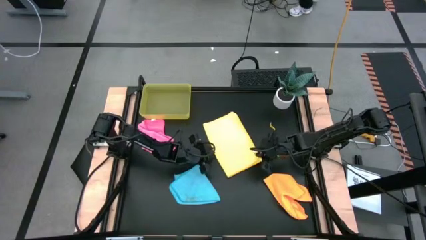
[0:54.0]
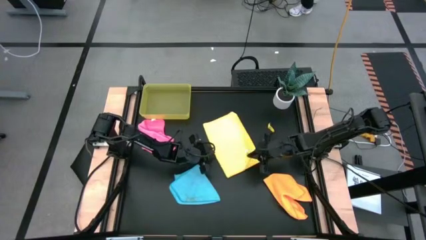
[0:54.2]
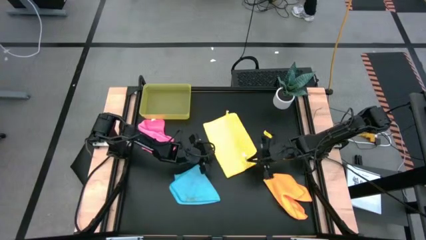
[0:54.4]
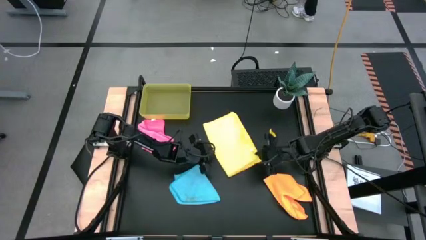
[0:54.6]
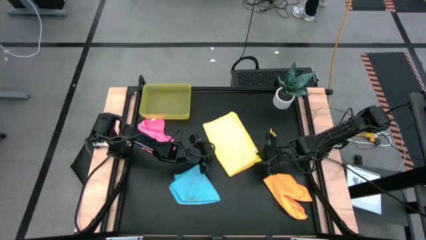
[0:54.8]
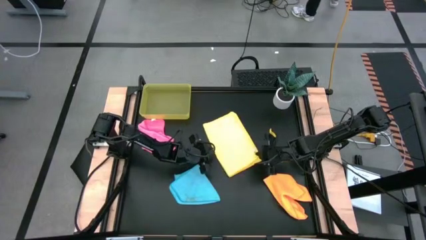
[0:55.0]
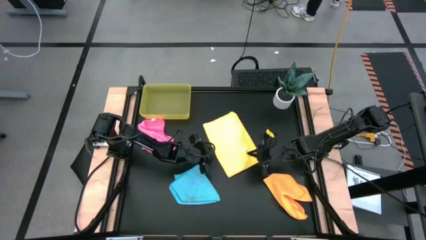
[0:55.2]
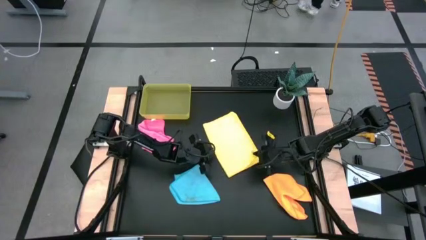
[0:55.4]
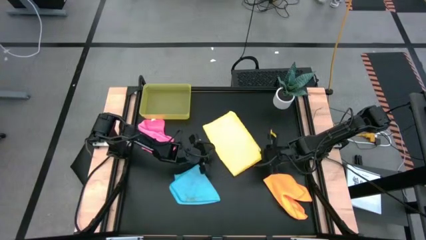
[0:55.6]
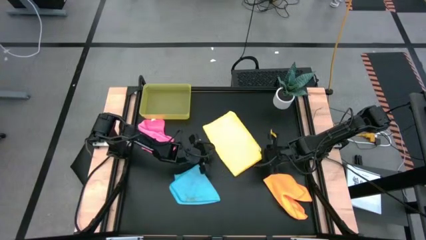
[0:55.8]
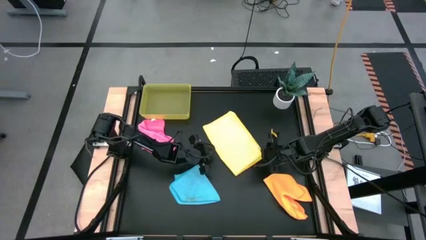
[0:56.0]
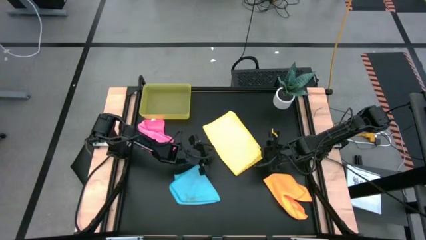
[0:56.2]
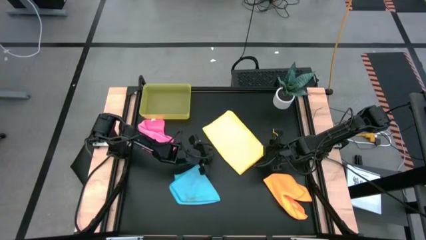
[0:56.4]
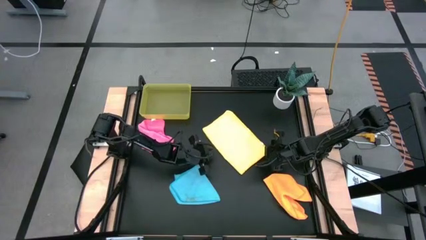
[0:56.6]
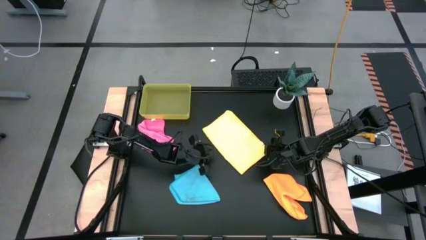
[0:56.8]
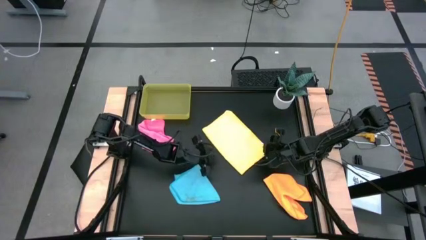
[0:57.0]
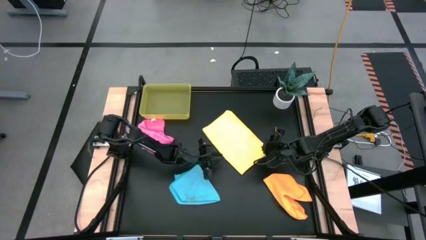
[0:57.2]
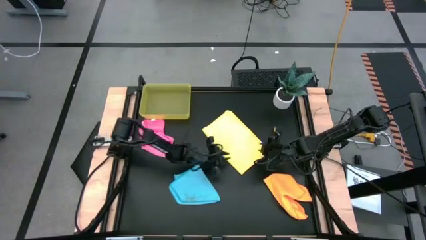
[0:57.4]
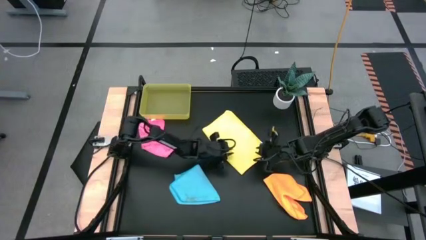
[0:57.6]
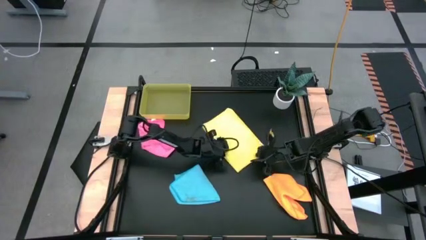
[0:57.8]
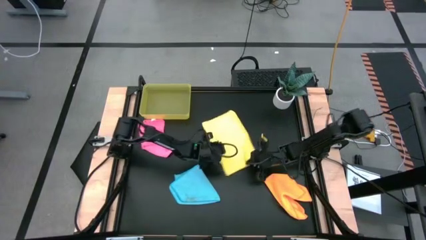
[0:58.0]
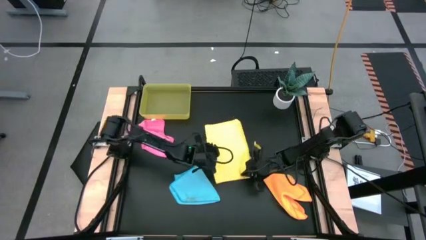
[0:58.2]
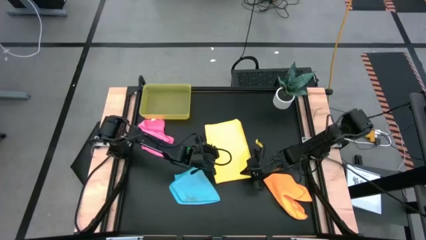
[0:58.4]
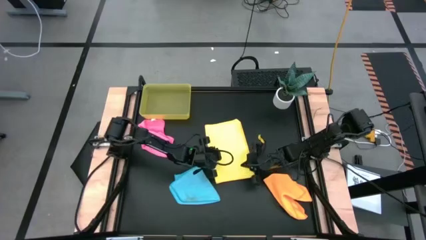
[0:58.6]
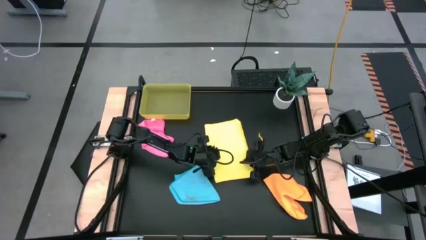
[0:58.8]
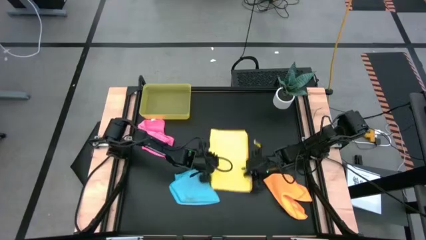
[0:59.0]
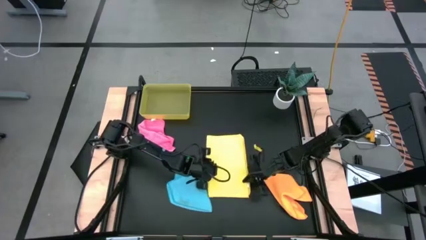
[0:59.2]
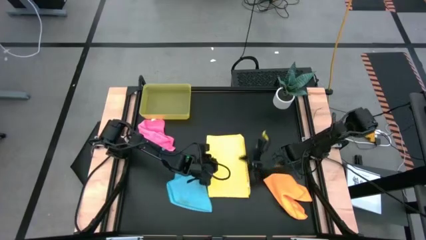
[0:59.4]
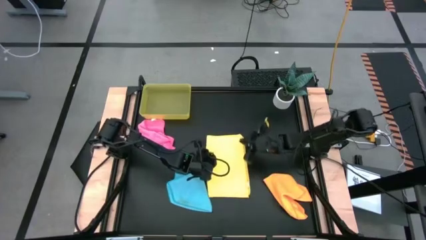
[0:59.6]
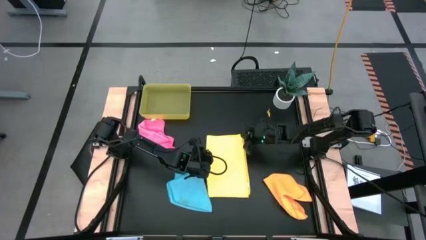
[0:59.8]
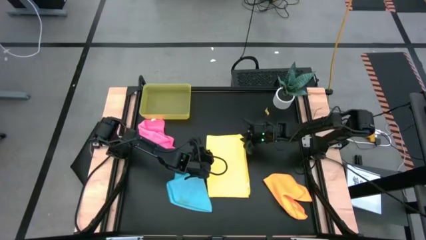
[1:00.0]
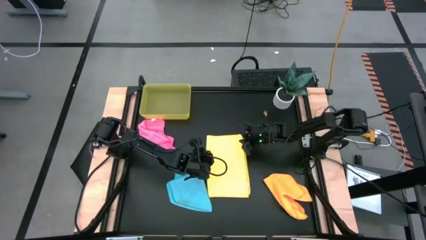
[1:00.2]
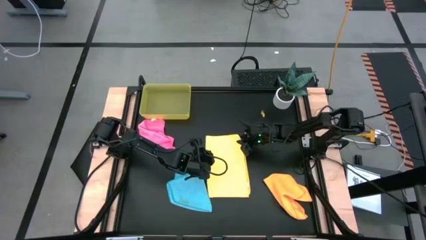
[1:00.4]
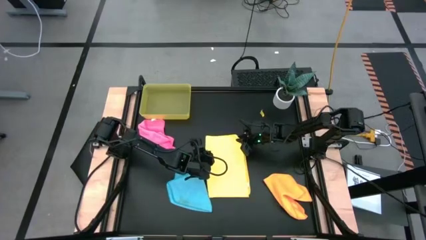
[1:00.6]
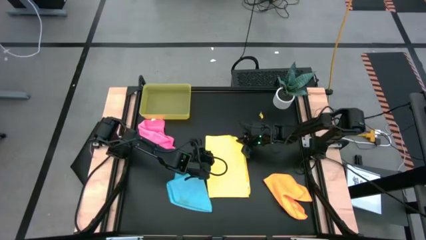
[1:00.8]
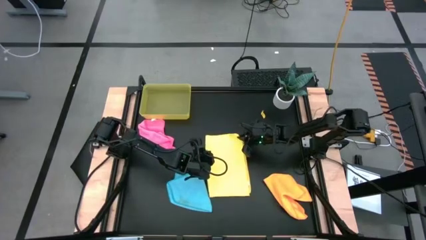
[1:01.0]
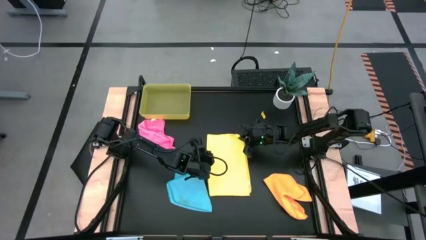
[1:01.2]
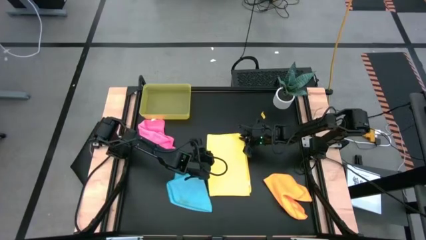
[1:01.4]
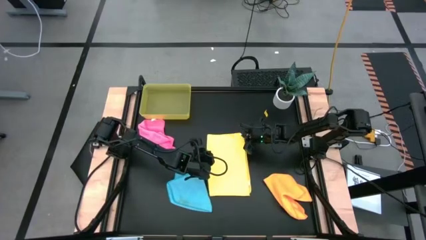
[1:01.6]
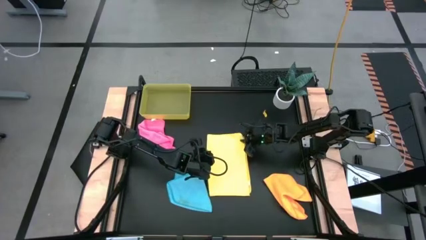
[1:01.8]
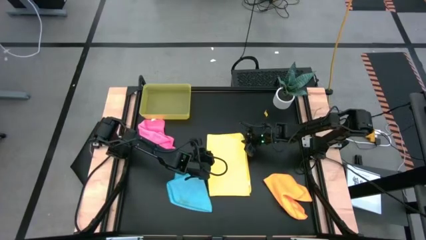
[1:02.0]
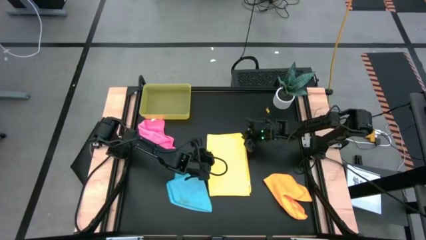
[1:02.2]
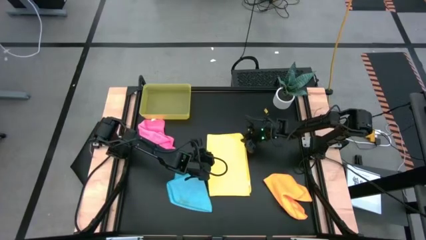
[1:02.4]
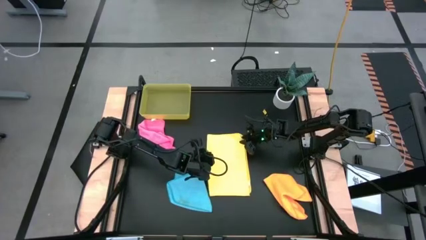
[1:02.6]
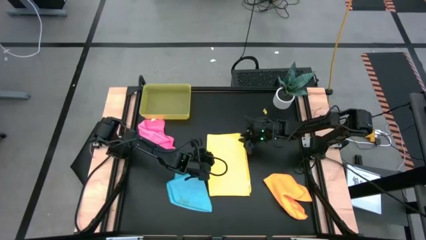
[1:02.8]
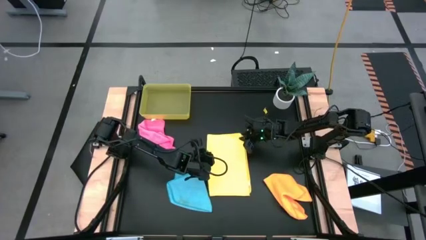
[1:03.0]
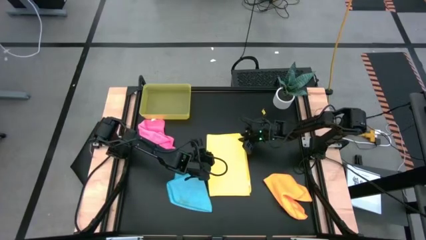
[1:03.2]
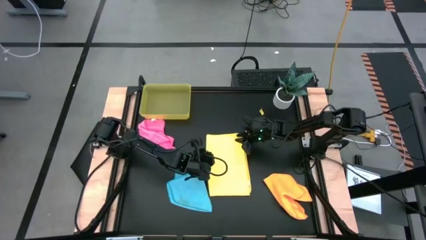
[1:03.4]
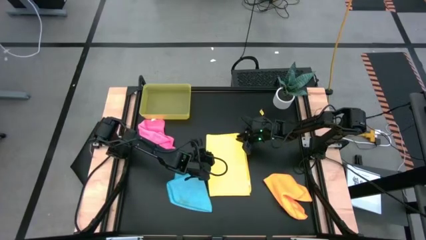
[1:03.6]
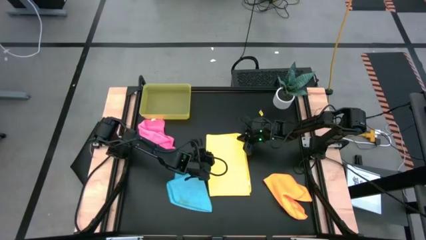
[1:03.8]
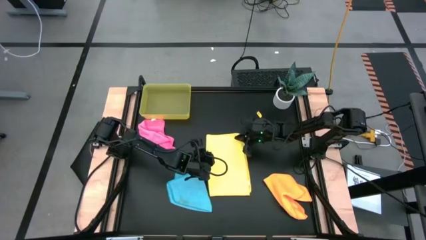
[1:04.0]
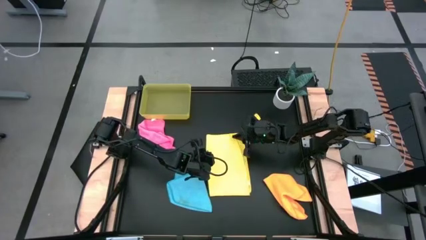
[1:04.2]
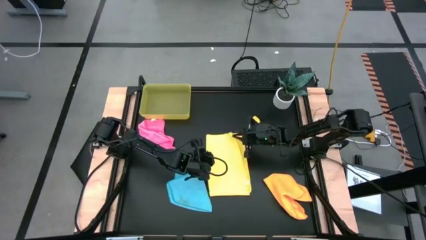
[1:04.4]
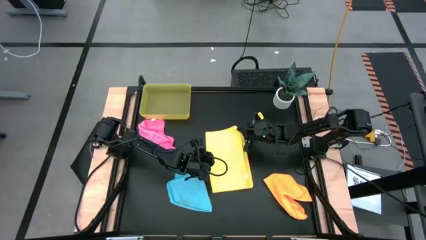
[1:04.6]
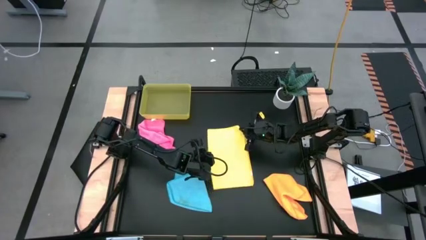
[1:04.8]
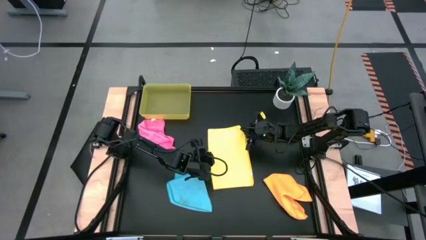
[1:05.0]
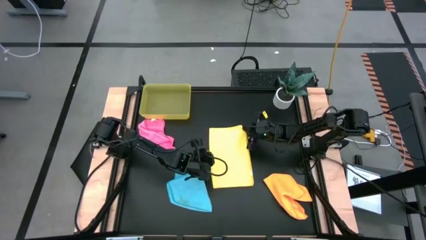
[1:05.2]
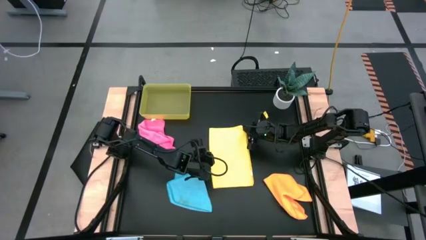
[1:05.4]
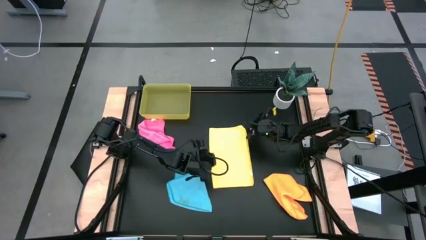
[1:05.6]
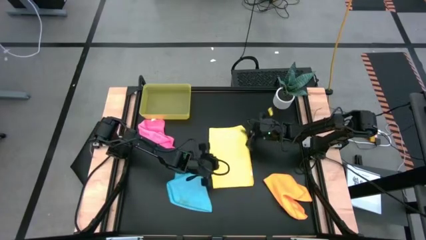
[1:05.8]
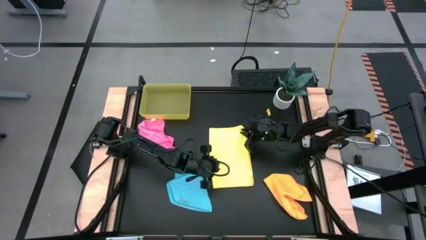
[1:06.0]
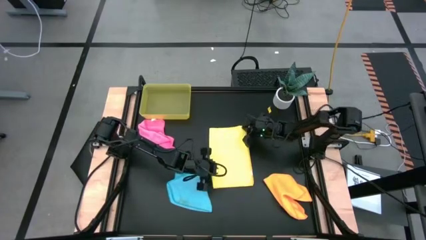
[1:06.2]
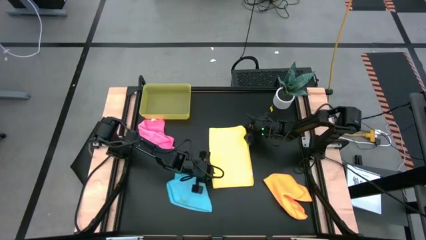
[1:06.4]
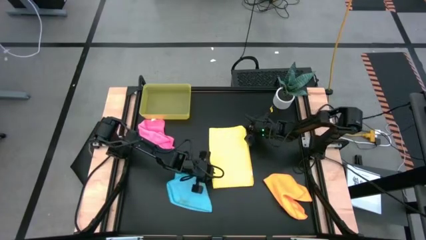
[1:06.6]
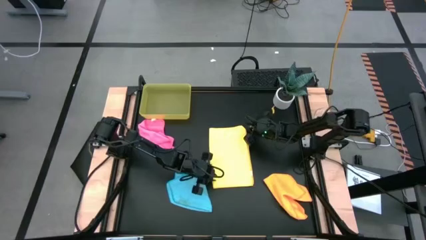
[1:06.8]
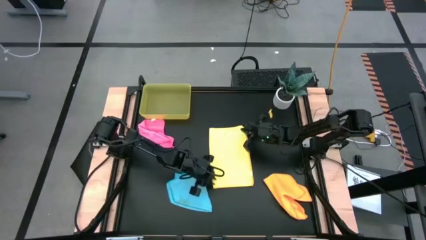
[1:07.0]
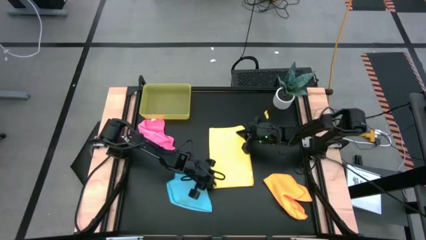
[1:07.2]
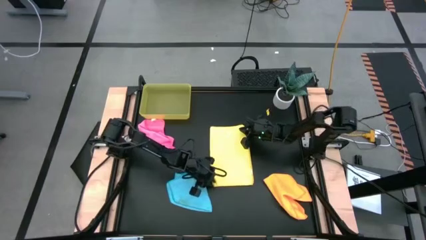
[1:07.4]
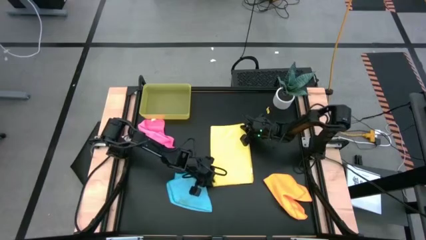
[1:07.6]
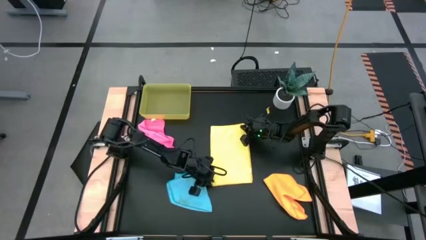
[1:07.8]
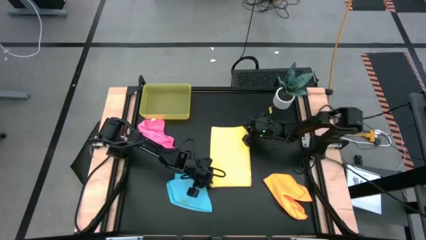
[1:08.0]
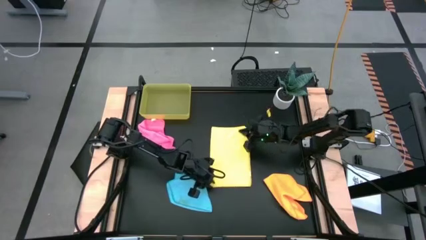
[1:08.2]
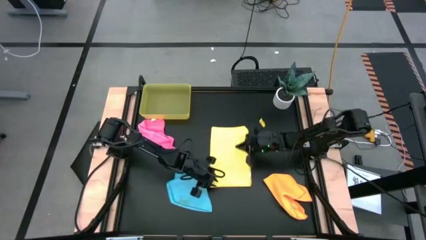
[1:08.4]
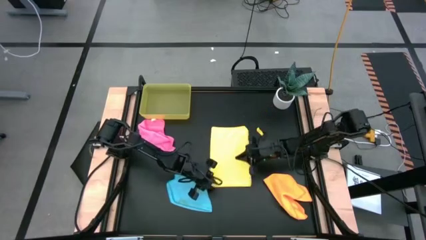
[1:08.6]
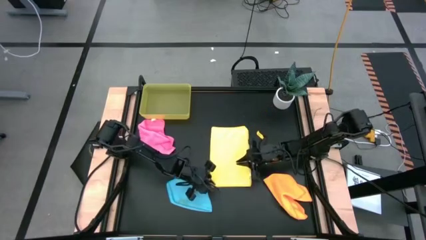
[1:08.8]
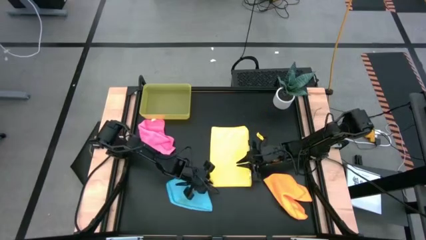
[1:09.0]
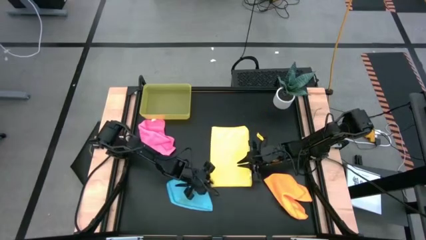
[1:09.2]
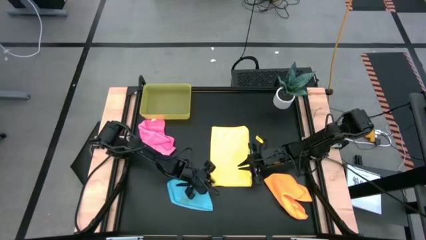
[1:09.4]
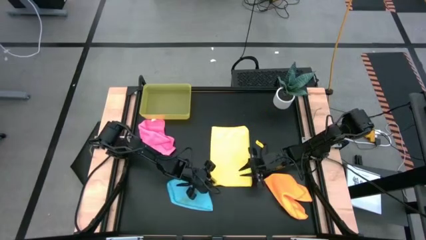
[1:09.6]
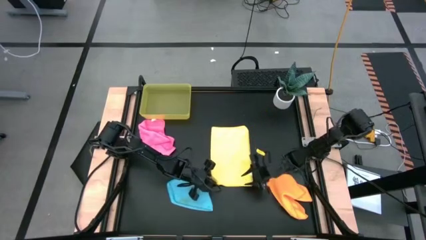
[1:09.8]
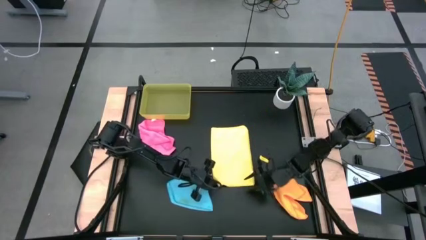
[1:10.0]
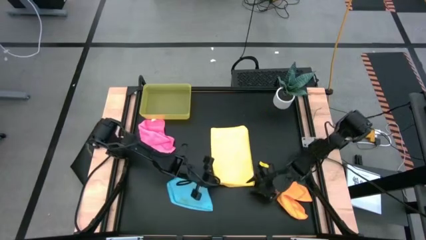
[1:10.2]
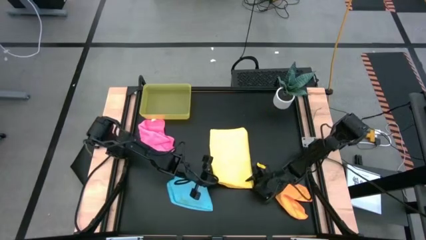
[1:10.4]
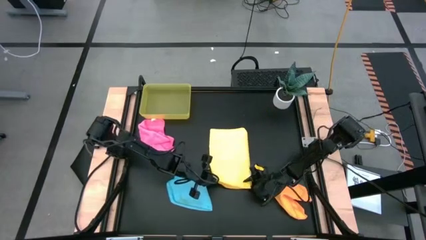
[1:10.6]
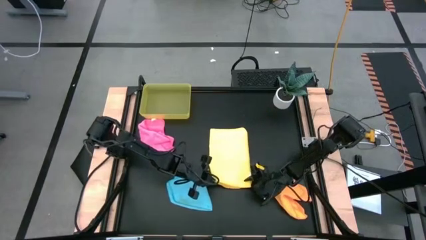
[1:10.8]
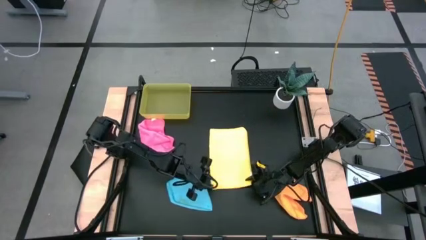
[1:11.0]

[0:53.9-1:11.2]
Task: Fold microfiber towels
Fold the yellow microfiber cloth
